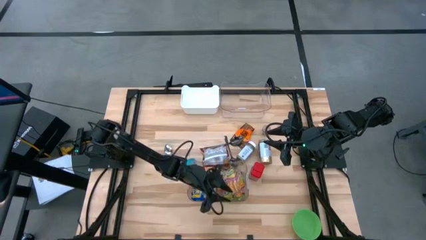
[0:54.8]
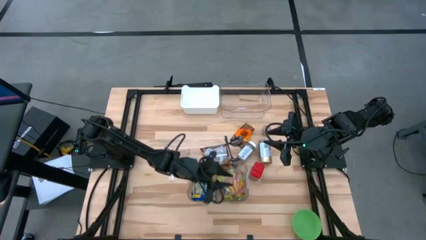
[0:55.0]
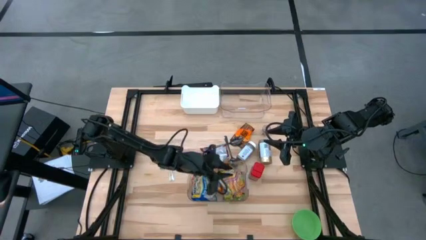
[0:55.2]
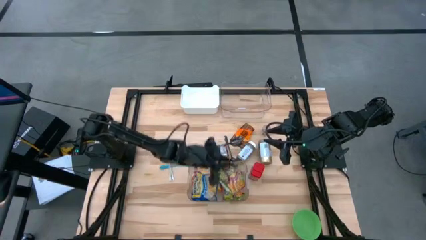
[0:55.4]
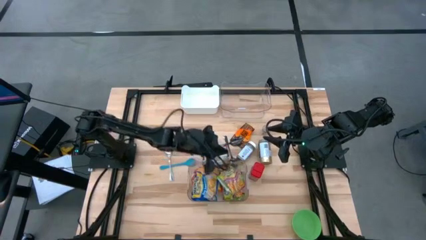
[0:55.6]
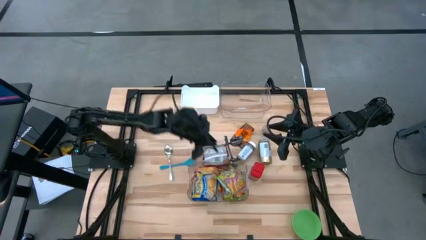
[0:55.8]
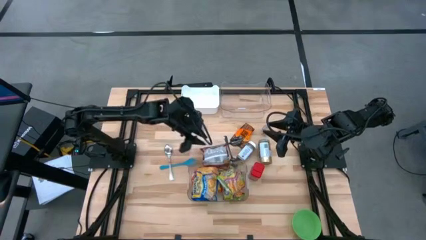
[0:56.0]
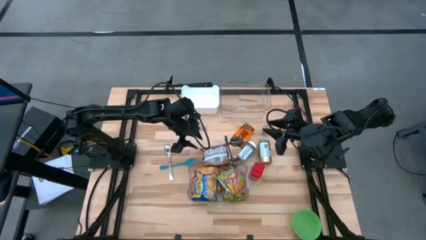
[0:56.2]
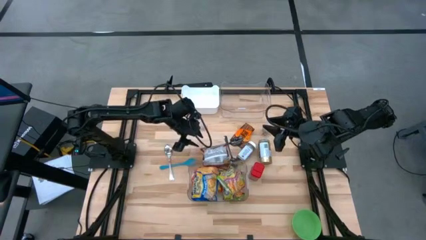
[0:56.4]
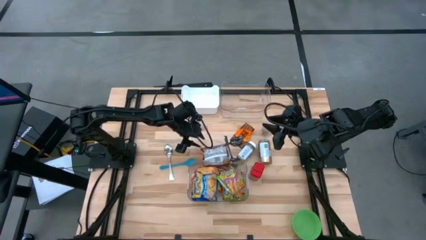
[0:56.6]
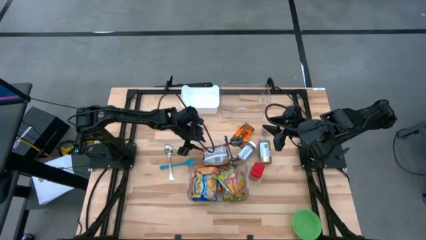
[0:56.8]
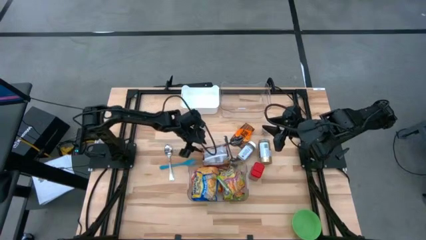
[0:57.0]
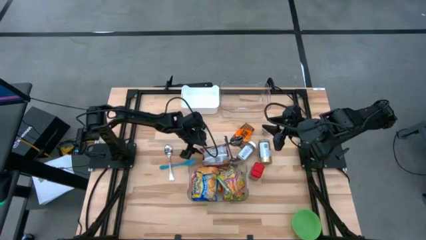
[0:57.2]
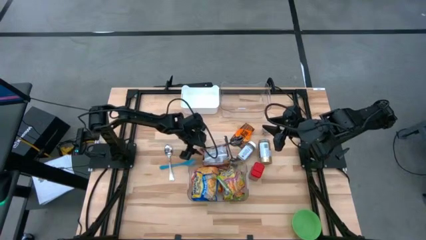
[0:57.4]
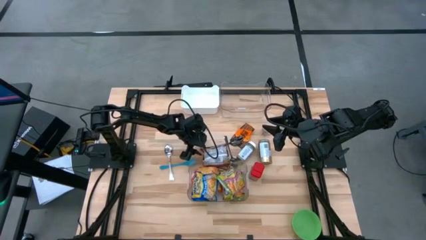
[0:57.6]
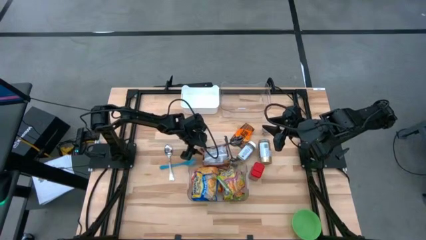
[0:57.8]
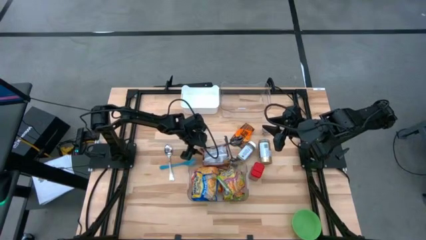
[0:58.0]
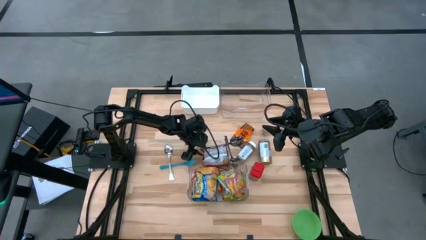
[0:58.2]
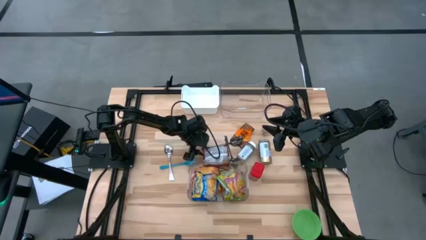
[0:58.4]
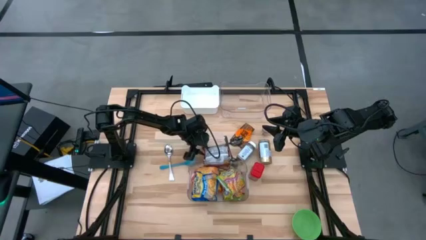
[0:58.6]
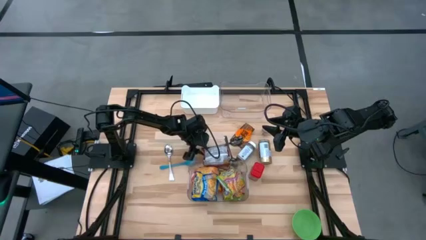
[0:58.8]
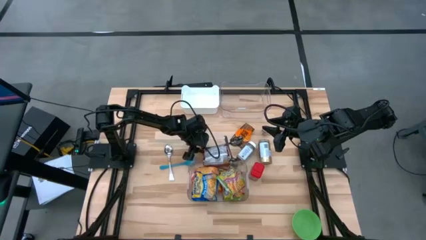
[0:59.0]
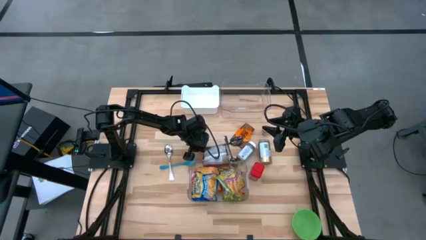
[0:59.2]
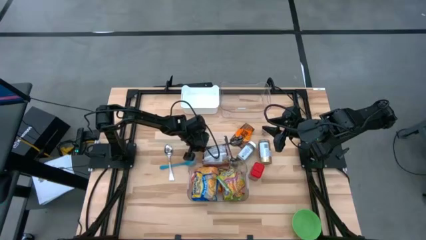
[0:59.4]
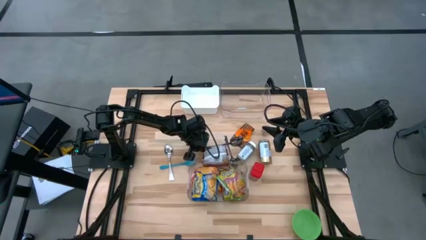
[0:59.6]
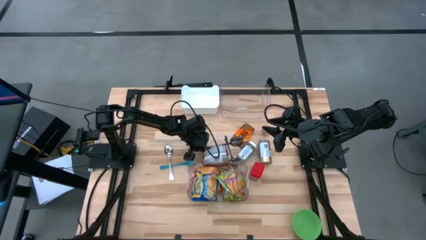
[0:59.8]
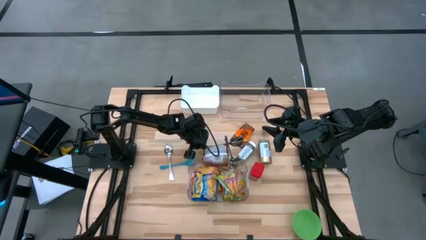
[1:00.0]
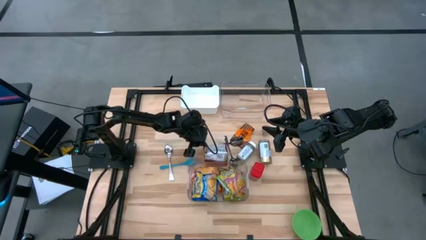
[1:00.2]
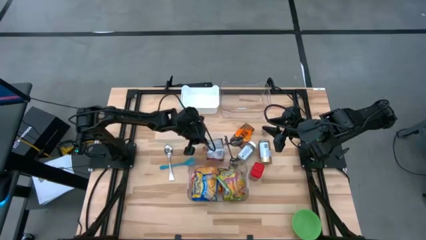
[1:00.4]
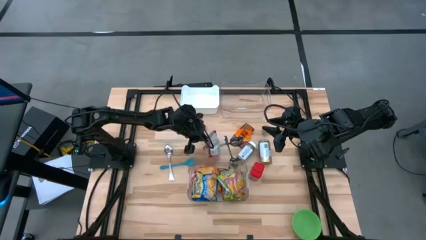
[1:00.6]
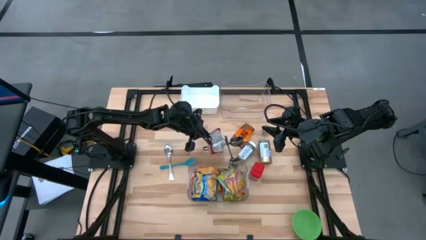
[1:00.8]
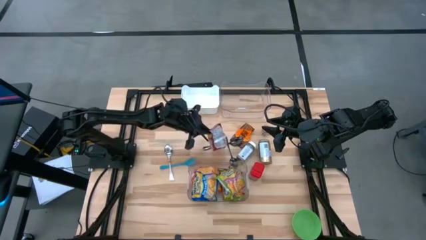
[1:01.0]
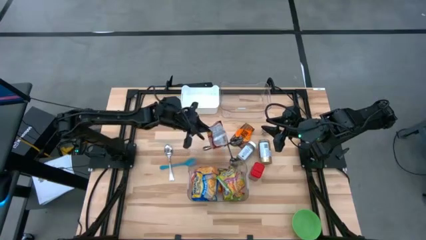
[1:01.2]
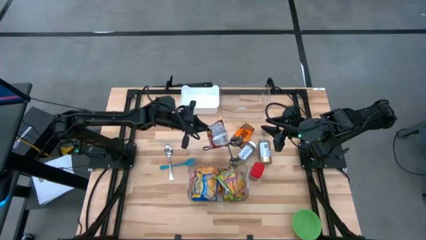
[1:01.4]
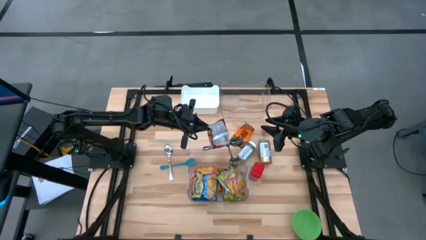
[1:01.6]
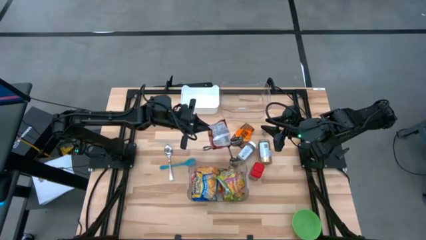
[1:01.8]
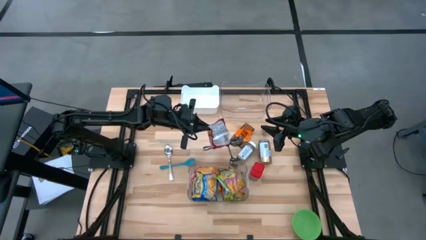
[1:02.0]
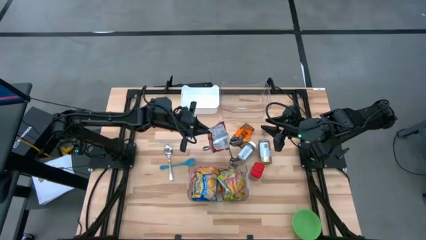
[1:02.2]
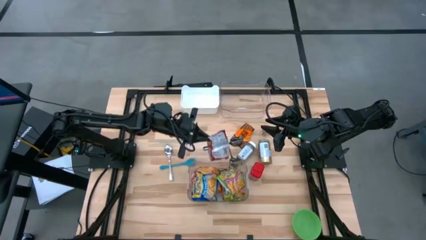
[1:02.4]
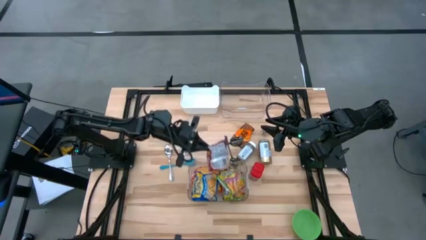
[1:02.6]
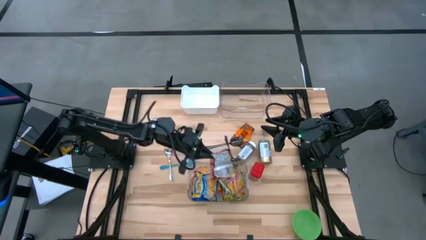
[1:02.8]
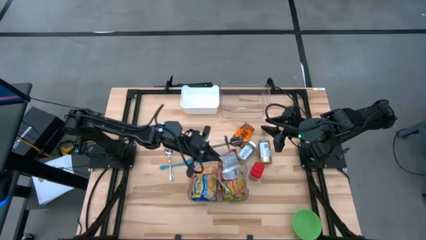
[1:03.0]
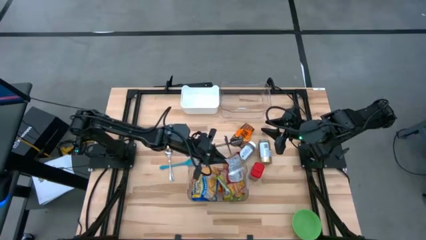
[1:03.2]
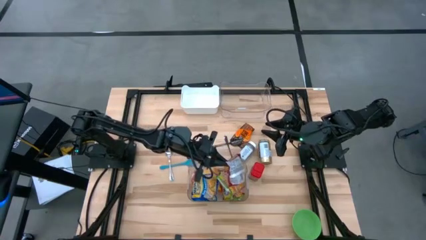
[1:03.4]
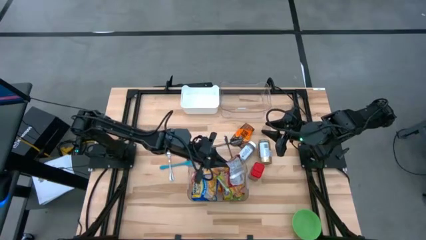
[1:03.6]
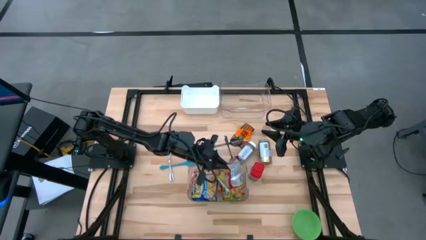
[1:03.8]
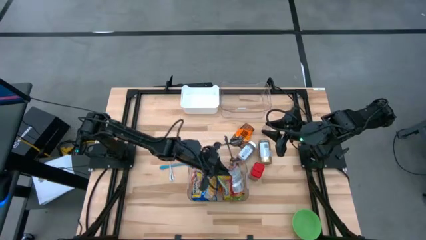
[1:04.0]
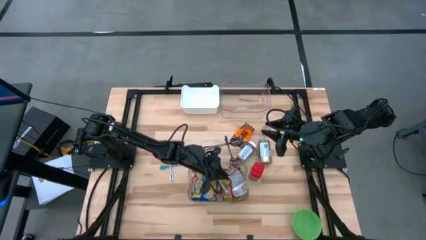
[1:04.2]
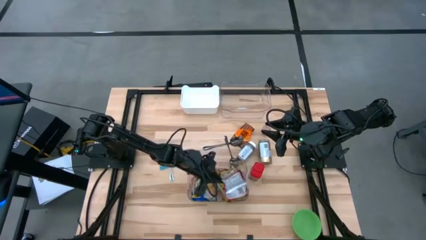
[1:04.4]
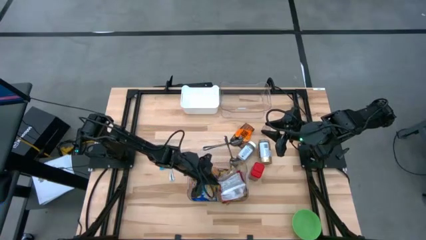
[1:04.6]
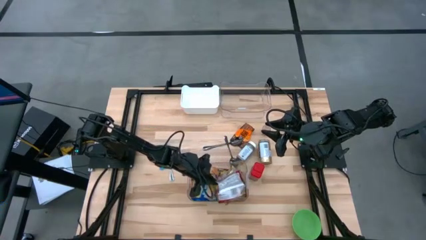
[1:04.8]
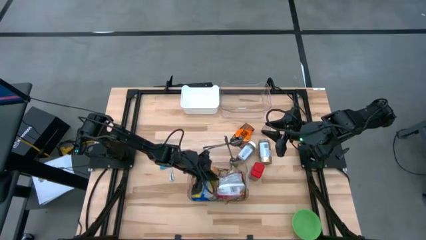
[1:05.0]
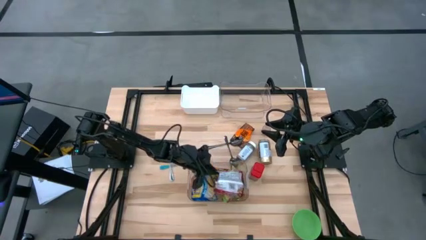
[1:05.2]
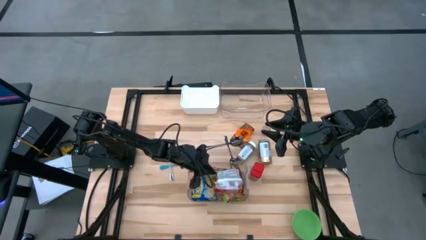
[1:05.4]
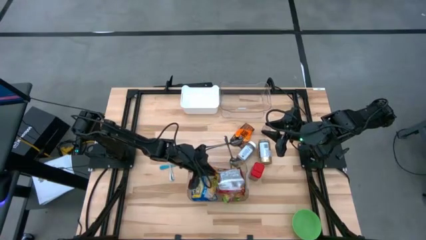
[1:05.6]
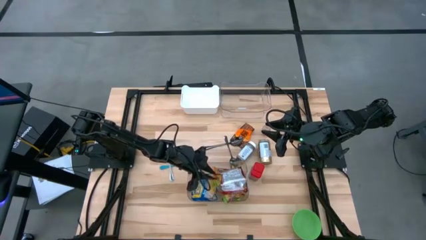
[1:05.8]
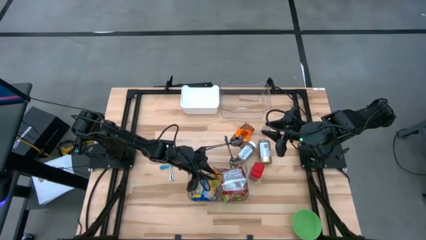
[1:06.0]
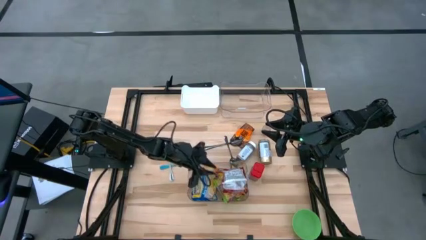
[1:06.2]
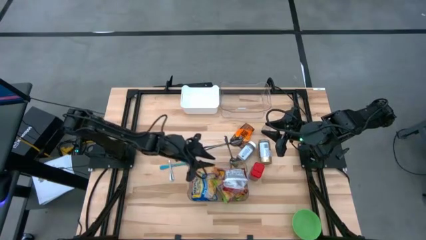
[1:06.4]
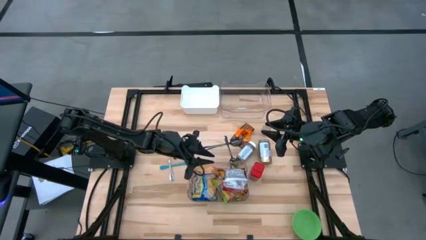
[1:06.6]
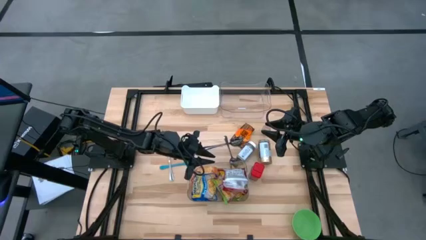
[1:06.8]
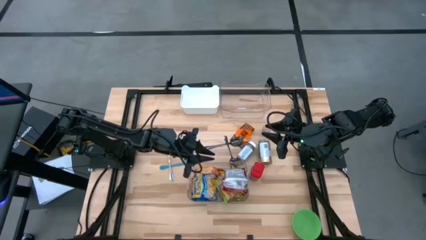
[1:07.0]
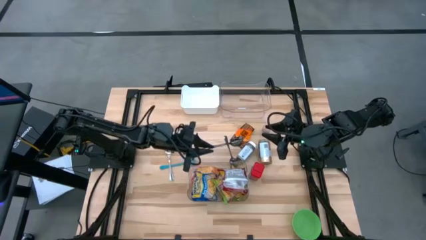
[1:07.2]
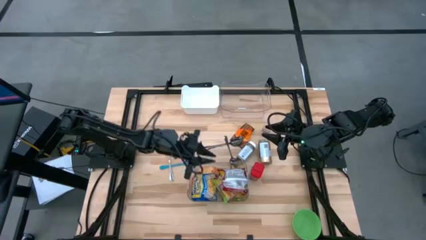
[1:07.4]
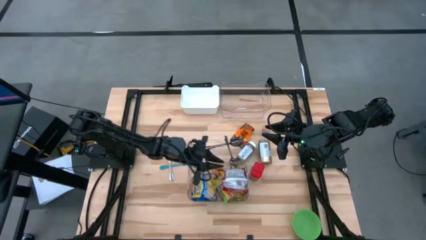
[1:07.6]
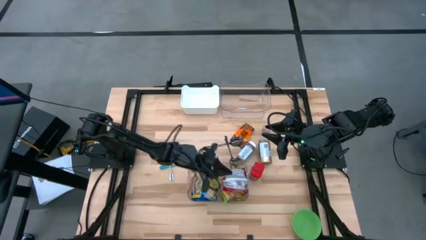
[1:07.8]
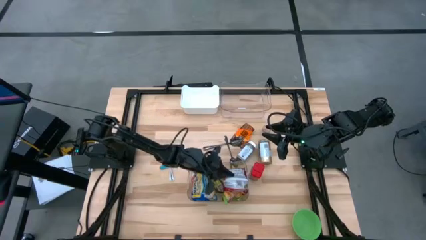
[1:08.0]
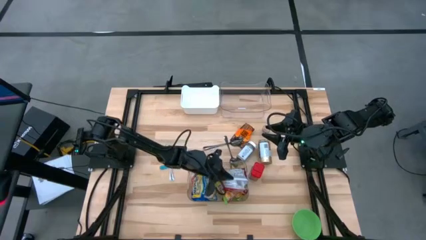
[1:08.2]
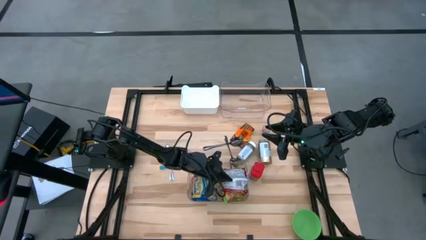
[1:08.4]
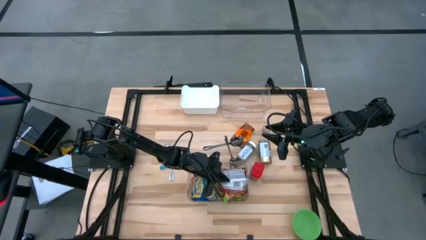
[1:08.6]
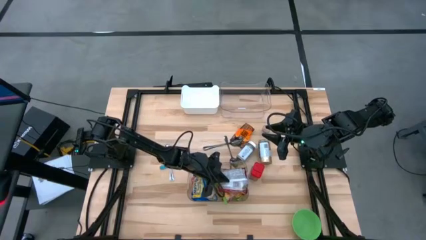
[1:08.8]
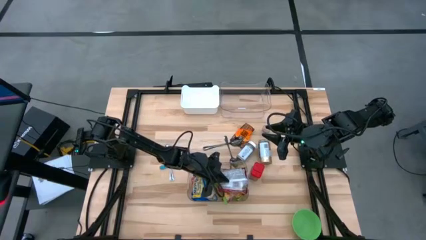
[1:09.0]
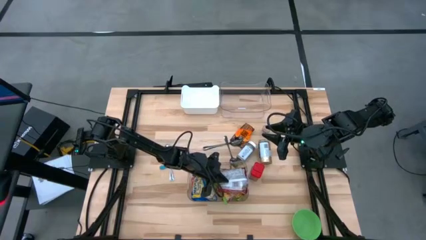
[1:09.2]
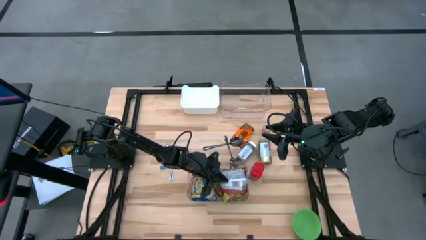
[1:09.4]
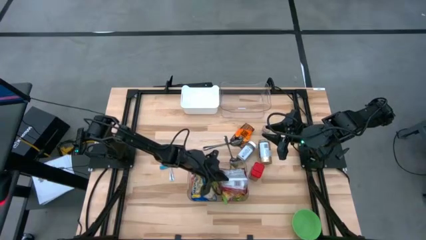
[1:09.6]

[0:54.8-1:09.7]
Task: Pick & Place Food Item
Put the red noodle pack into the bottom transparent bin
